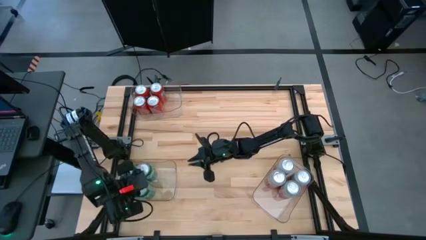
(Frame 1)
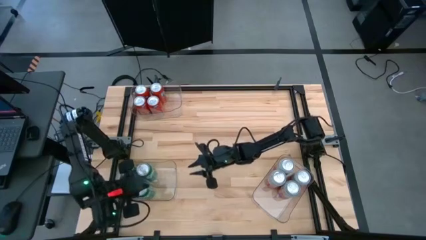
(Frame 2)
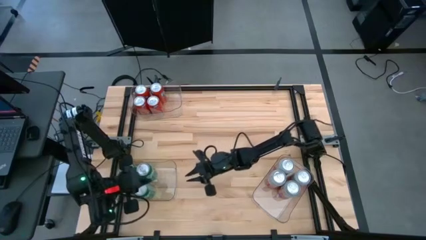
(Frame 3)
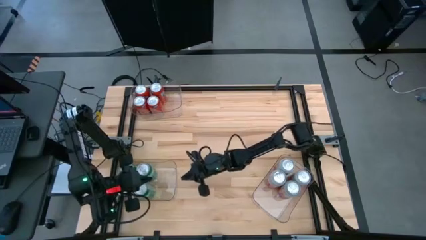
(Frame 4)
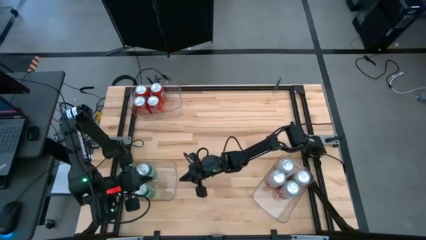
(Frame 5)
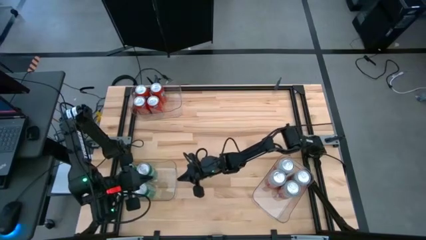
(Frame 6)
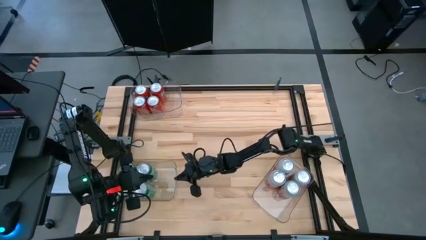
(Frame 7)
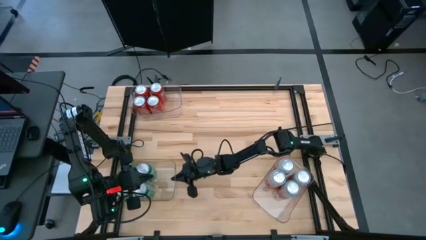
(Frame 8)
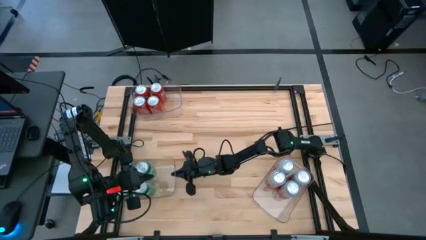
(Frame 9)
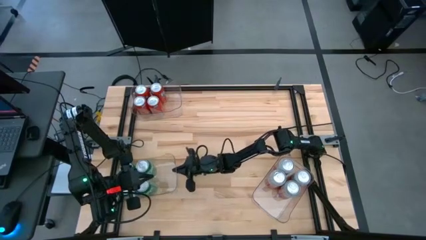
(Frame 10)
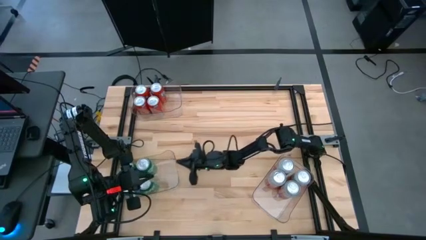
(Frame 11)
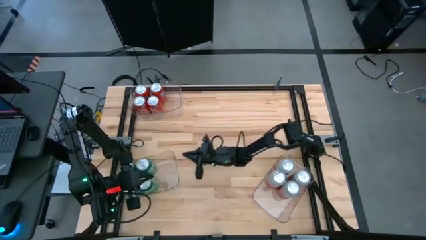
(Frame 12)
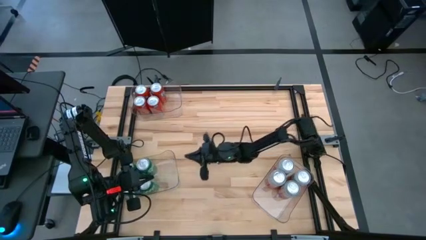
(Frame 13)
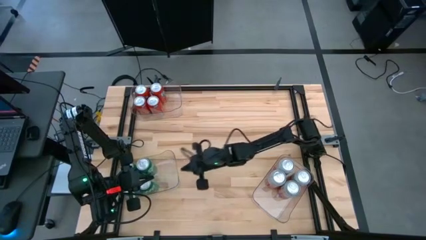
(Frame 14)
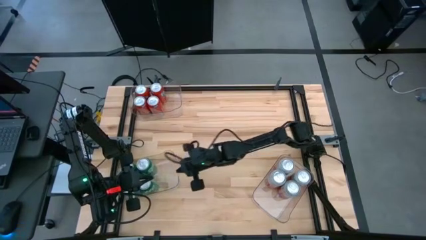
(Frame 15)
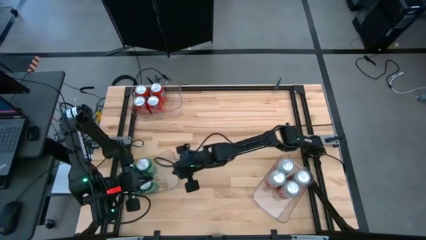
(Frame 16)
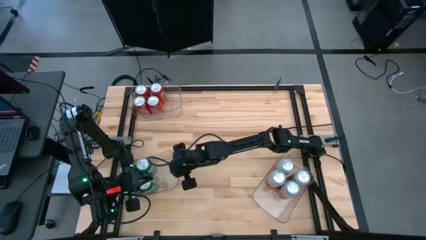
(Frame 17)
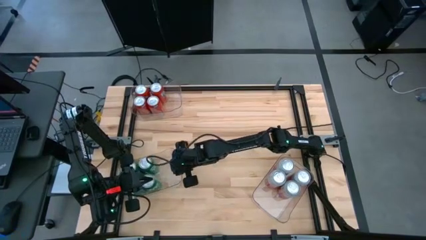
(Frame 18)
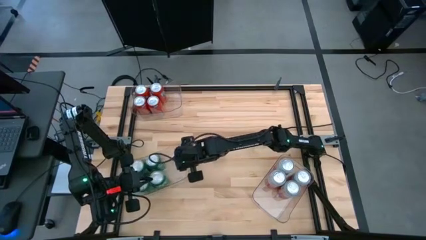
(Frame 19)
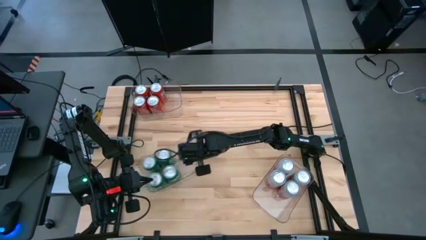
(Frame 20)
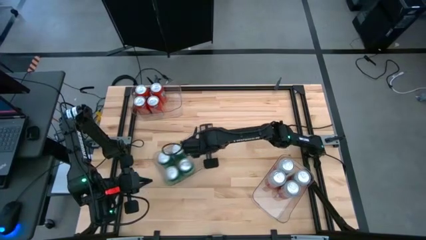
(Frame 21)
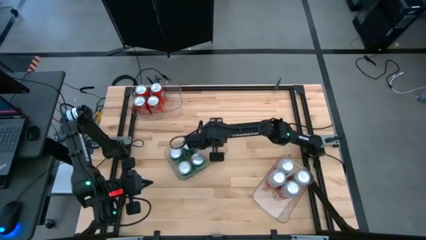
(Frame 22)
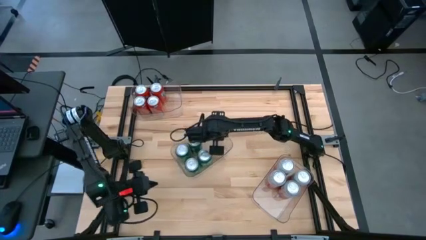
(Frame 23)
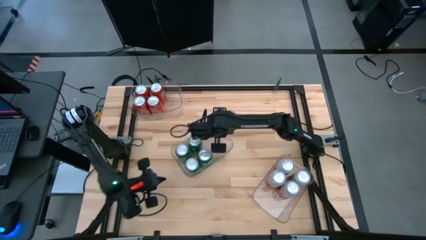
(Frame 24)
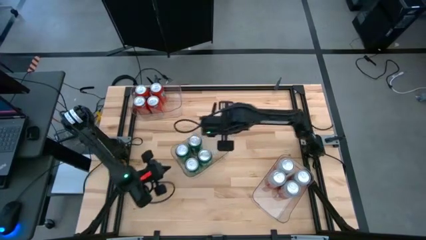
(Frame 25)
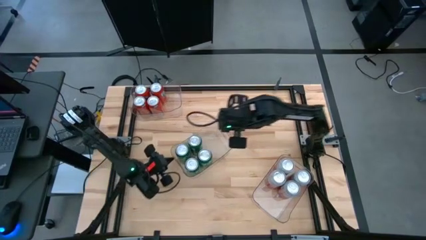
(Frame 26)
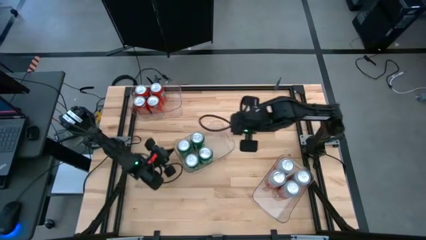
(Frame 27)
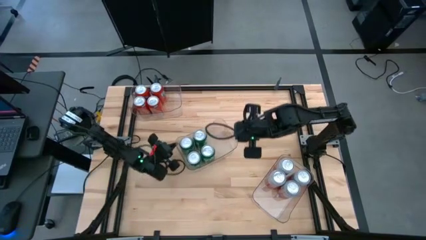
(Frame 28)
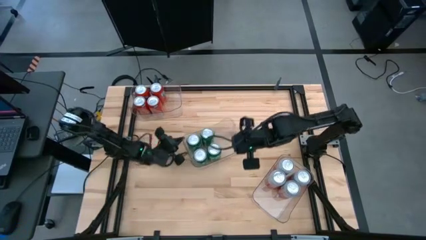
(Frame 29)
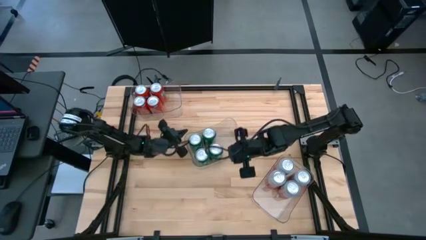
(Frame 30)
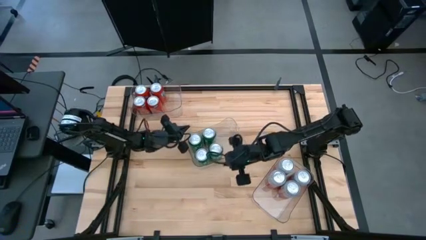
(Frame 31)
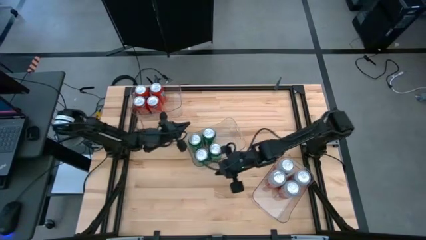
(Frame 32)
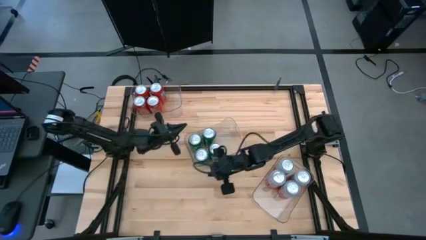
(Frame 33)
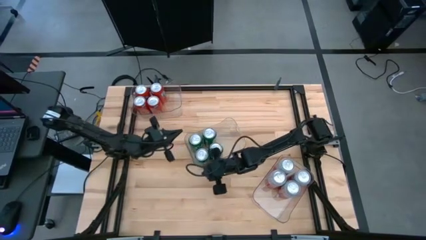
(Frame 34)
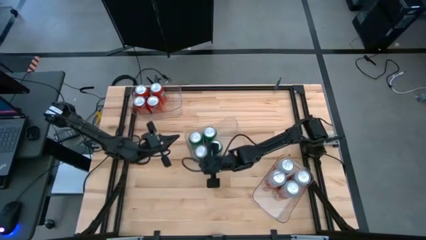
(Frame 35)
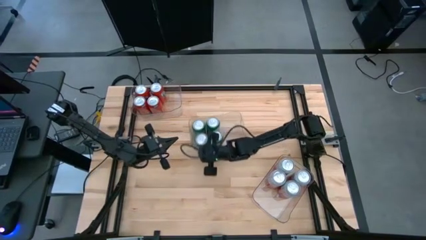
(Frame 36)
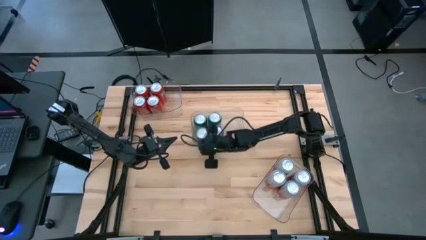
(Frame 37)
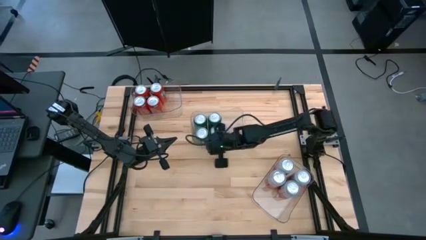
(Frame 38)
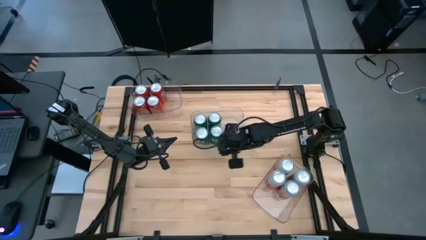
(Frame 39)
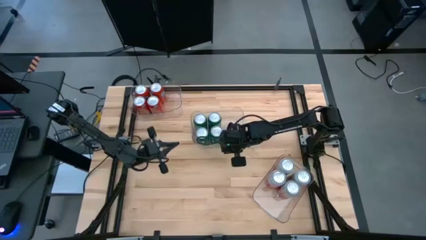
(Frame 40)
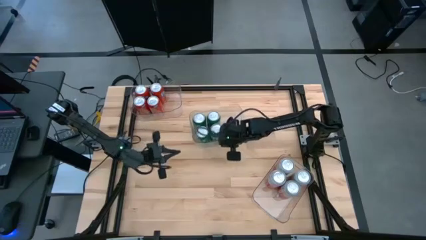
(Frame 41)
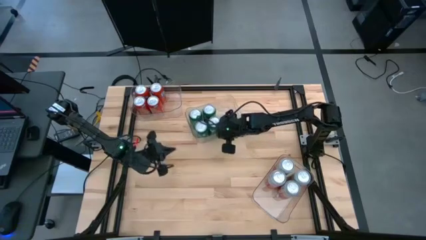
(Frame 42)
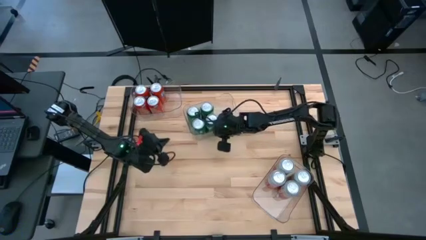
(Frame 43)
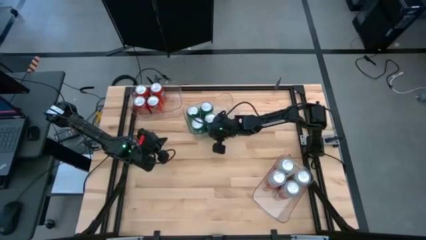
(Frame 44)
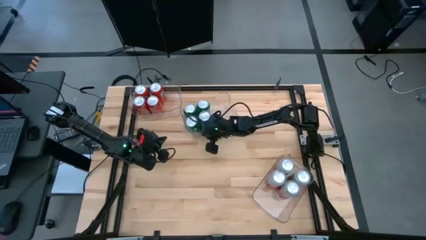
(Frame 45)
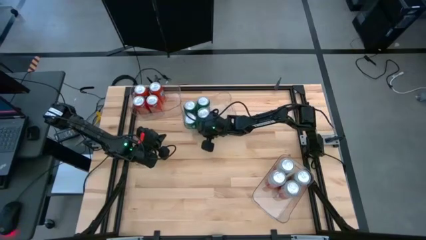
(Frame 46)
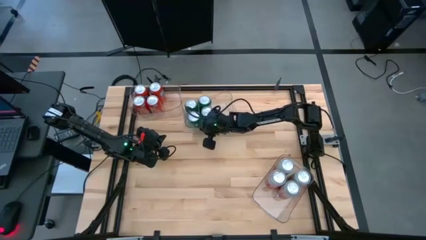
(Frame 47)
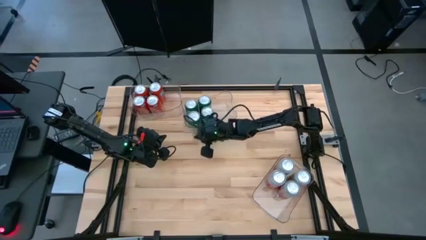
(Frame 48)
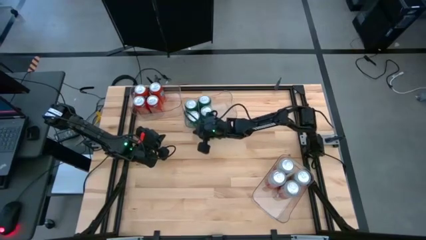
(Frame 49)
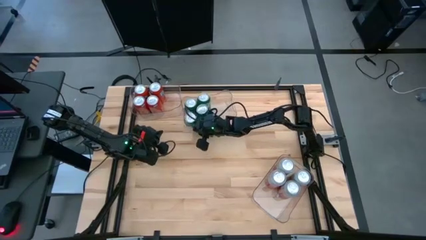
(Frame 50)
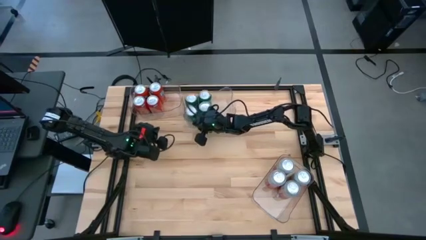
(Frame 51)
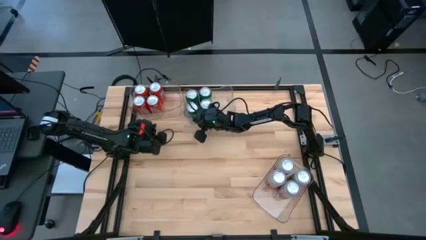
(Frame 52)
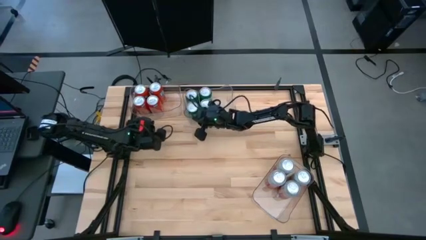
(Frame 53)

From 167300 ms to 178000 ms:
Task: Sort soda cans
Move the transparent bin with sorted green soda cans to the top center
